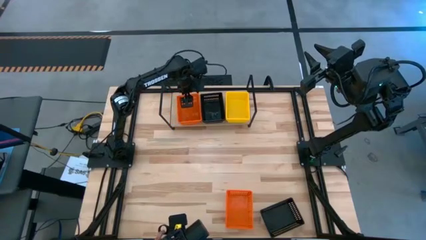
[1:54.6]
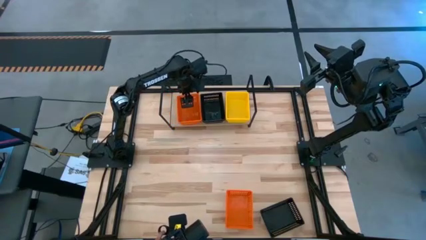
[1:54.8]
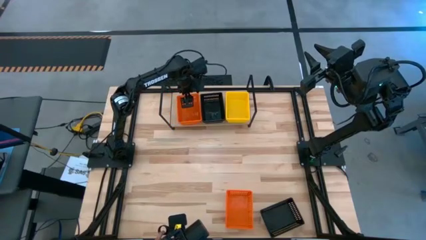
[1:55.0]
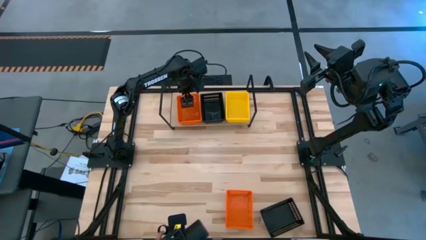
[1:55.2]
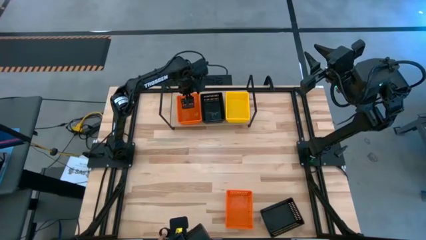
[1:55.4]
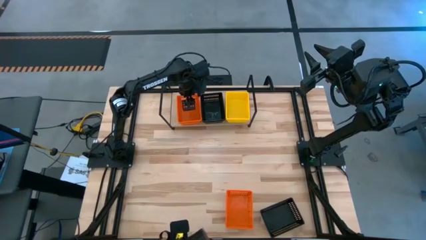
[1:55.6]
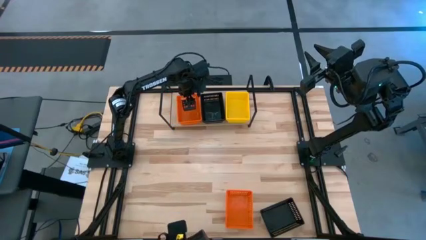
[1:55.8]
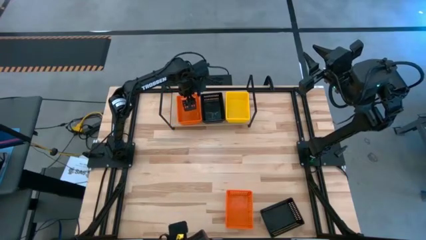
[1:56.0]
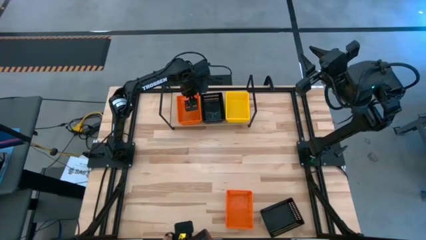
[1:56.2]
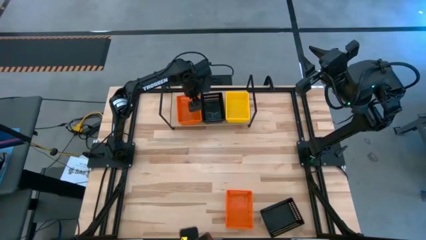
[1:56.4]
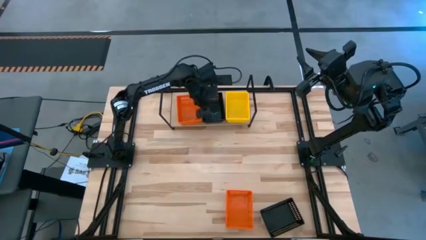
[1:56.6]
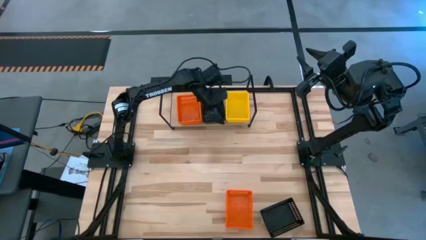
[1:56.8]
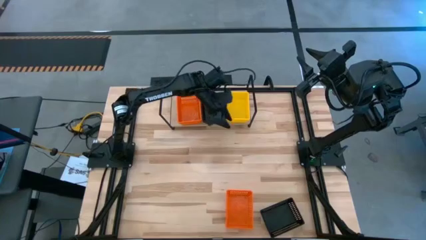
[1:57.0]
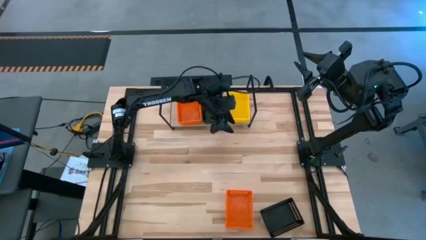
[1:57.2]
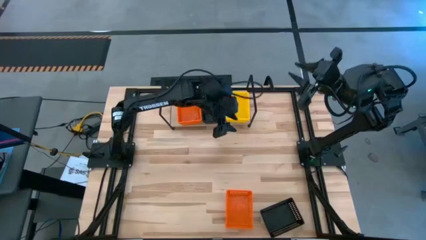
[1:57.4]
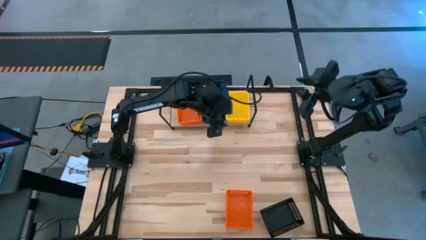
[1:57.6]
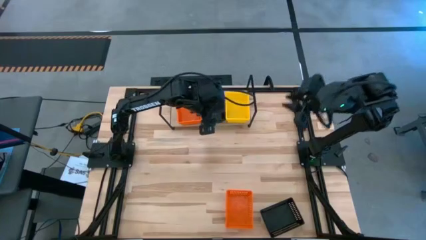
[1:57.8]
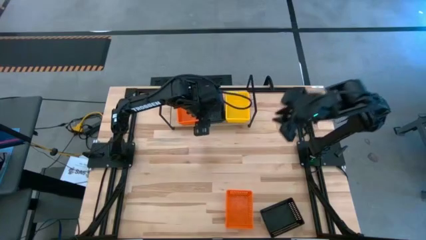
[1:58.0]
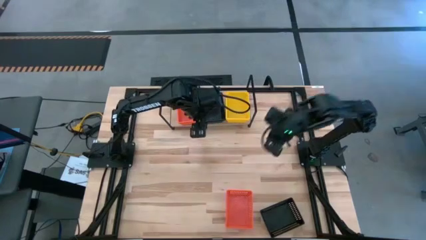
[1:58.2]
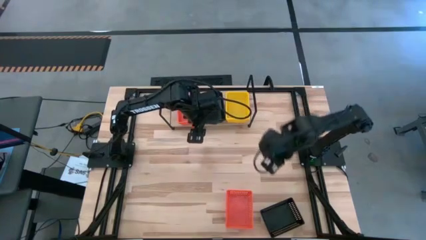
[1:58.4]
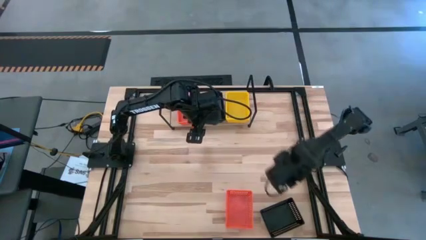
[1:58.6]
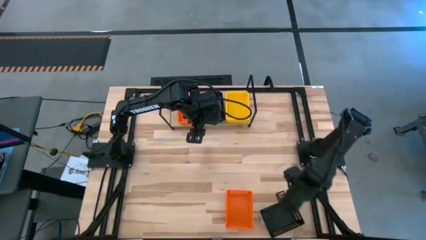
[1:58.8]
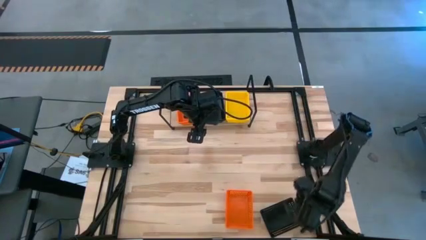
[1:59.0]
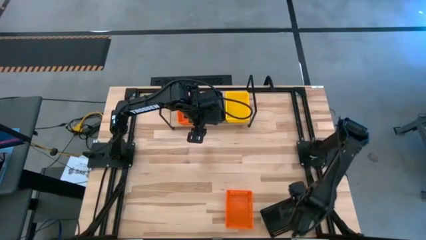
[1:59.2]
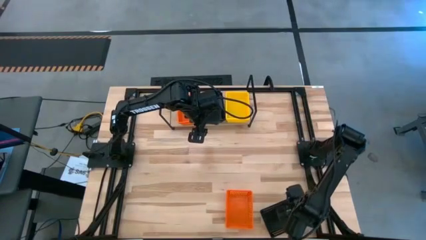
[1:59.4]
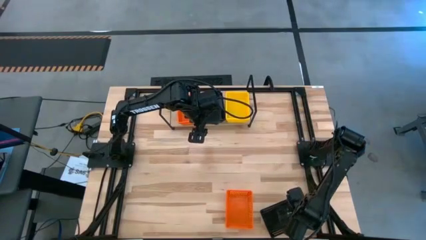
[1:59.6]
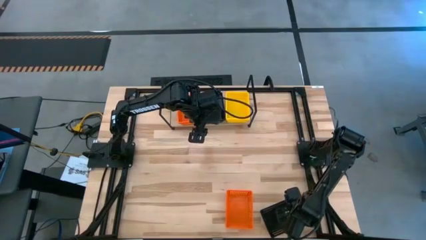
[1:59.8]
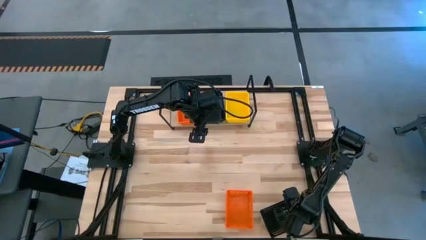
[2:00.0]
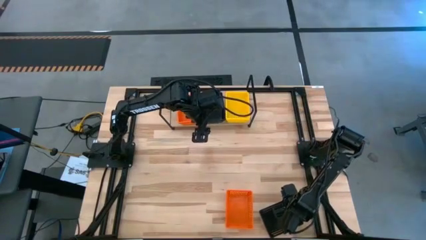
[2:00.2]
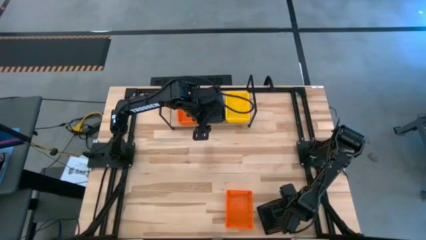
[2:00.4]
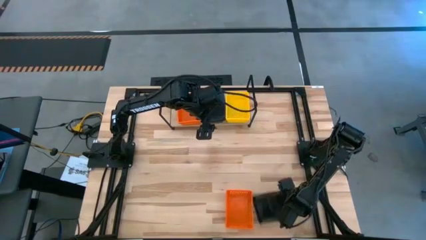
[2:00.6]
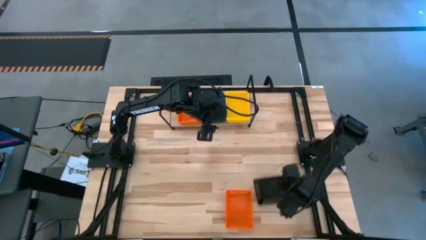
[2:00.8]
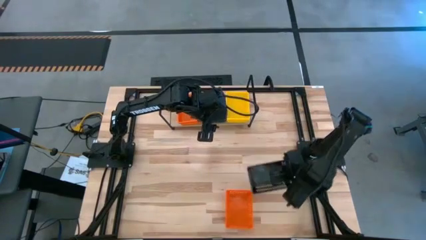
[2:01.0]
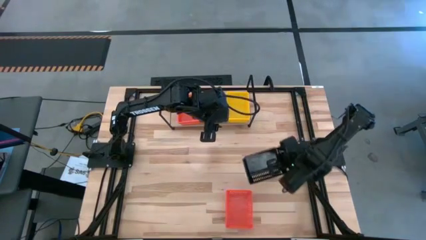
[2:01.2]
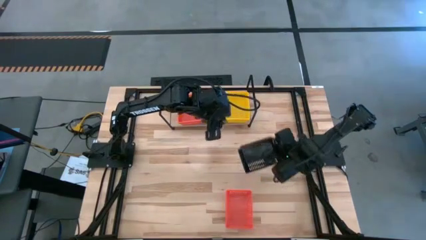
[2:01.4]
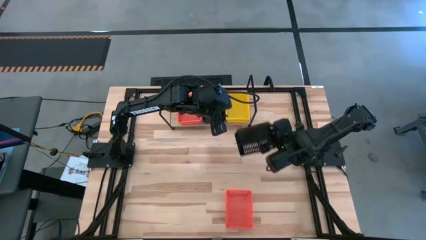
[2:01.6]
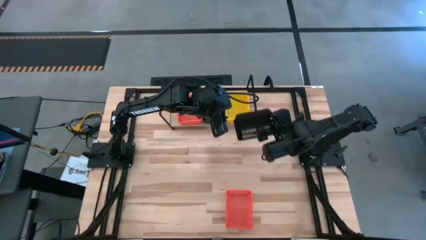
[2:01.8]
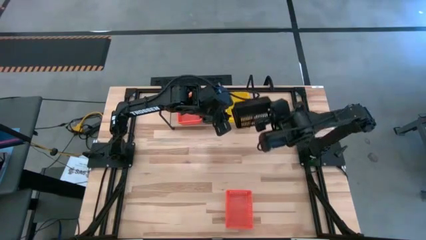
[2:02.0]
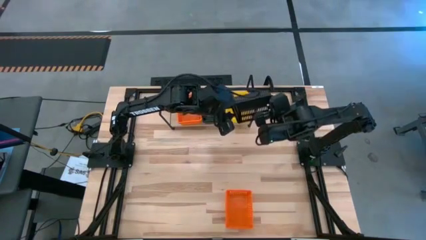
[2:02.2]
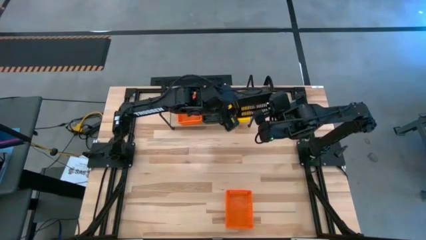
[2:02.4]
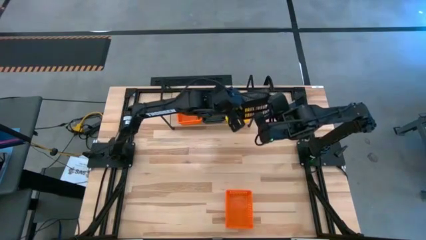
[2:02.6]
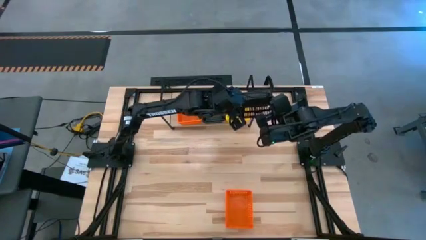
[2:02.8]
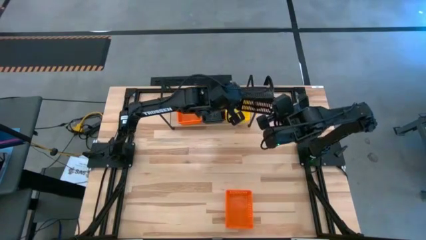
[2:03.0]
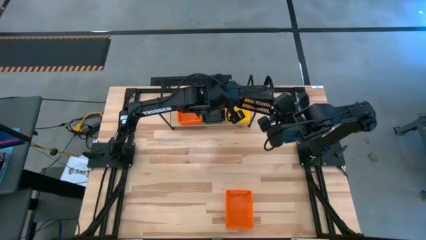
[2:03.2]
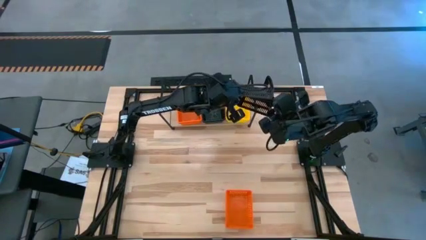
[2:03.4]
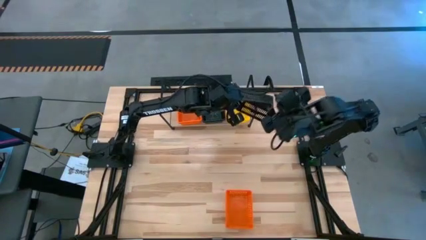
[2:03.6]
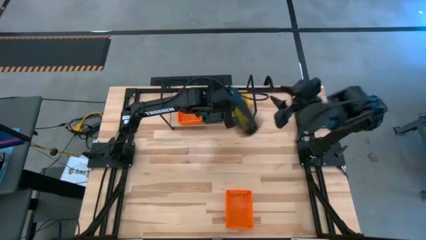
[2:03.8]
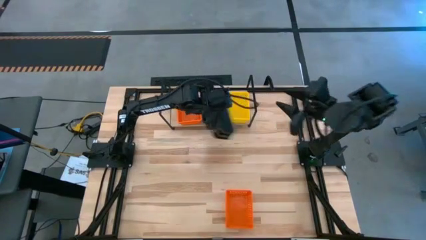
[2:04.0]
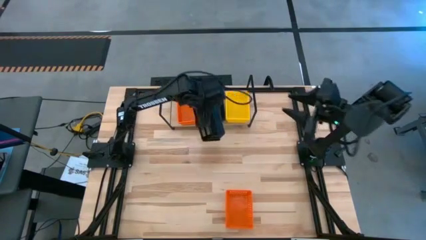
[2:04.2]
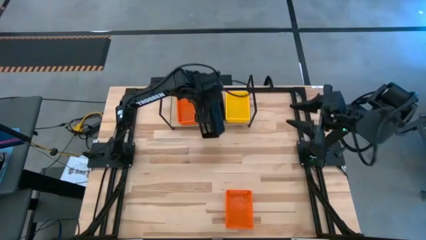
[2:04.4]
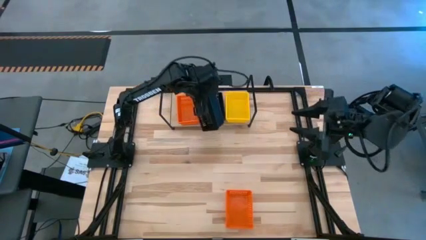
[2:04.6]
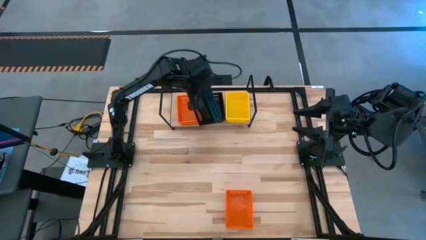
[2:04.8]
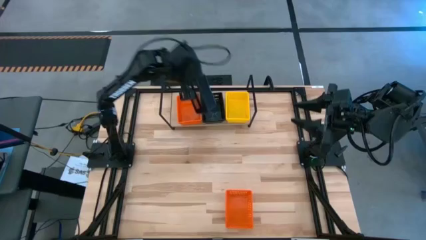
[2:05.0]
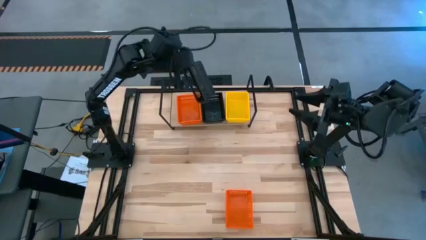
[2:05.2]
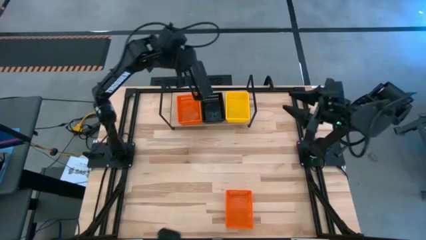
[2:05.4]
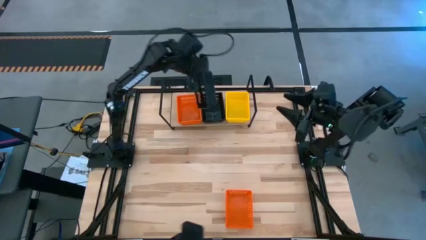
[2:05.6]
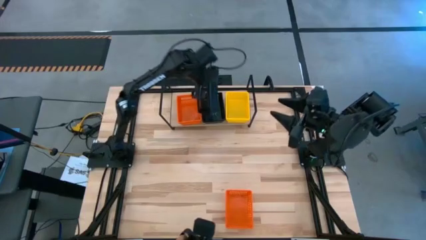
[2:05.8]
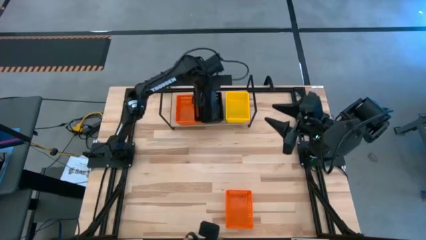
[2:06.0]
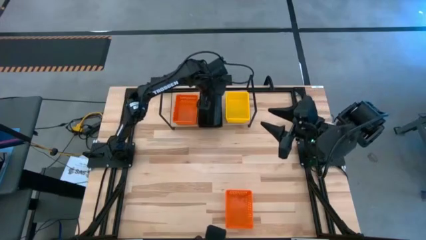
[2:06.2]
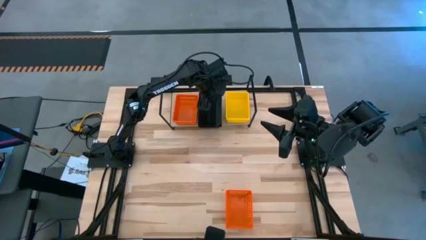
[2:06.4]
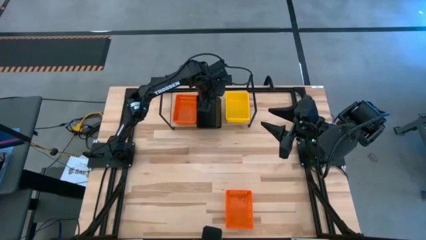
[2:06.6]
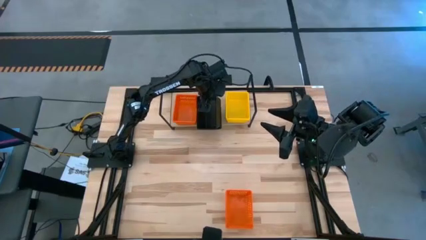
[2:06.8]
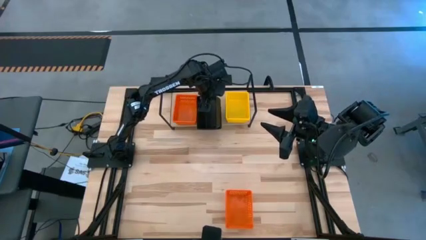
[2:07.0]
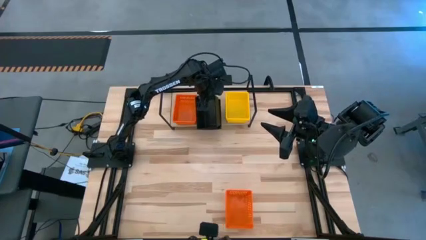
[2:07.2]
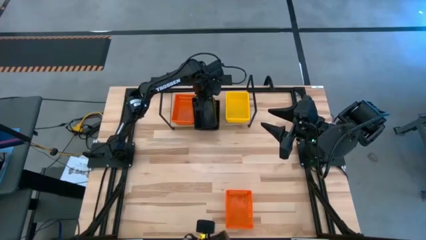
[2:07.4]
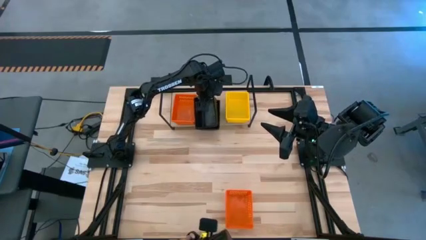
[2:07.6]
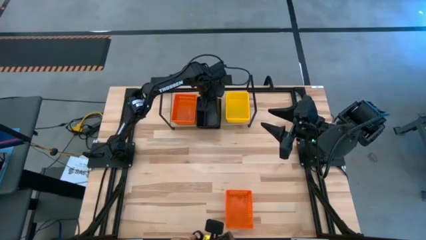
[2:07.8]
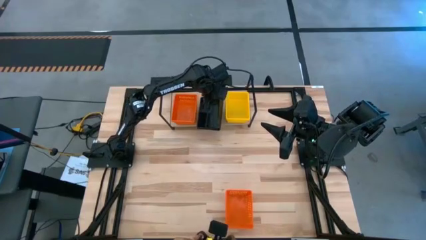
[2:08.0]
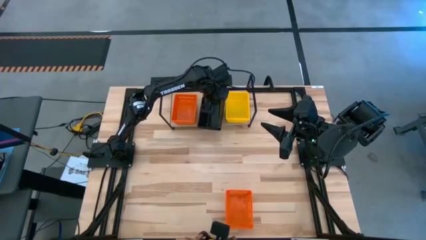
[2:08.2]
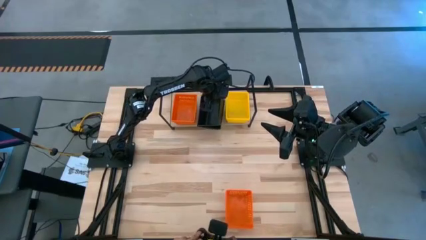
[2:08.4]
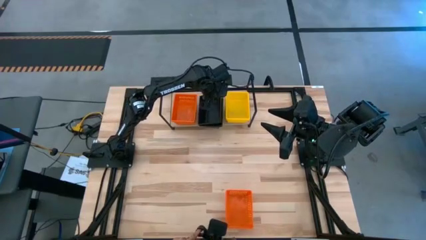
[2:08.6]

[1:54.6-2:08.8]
Task: Stack baskets on shelf by color
Stack the black basket on the black basket on the shelf
